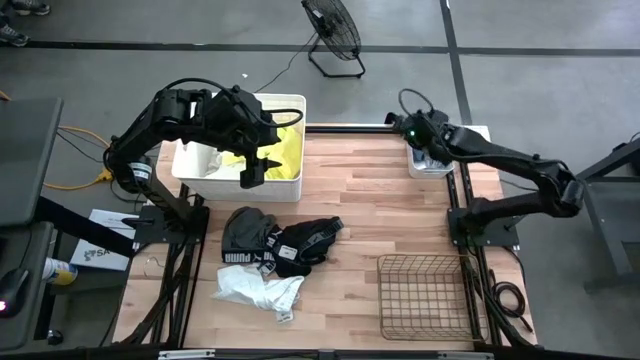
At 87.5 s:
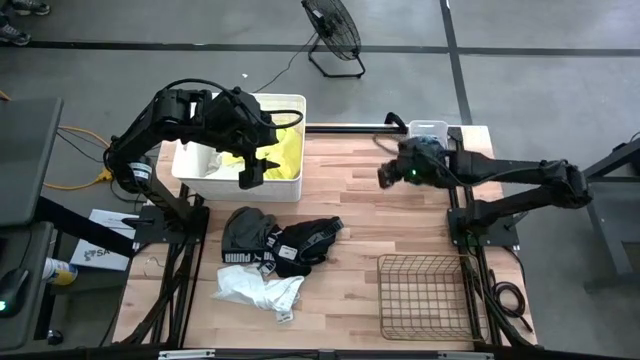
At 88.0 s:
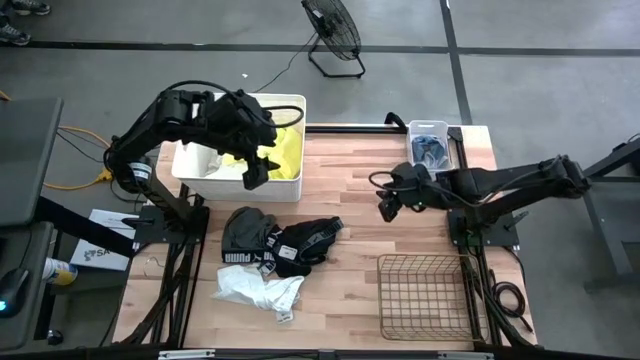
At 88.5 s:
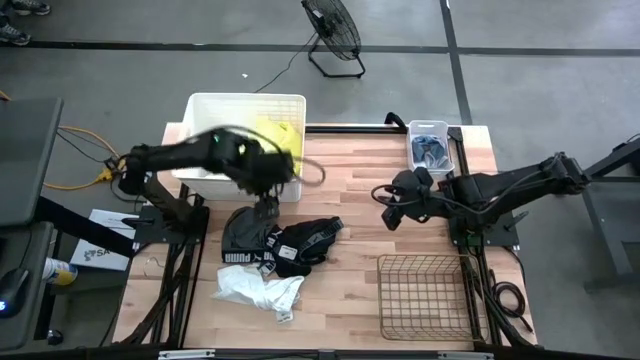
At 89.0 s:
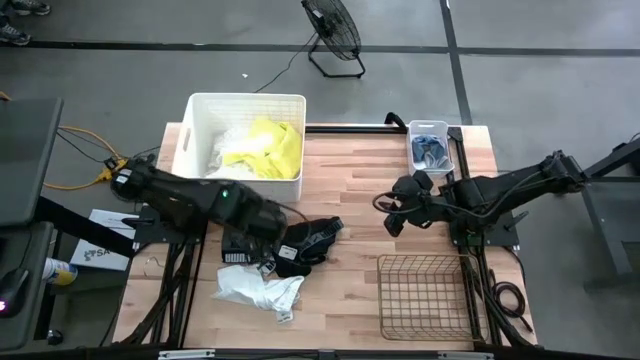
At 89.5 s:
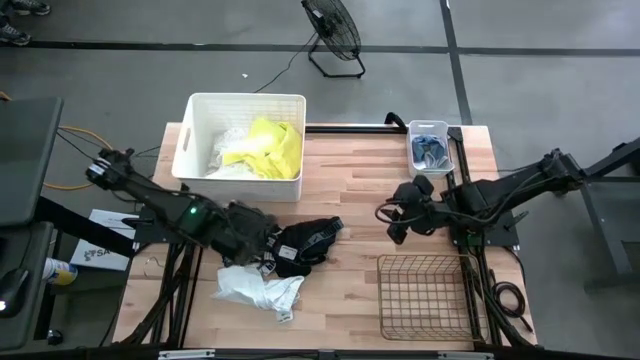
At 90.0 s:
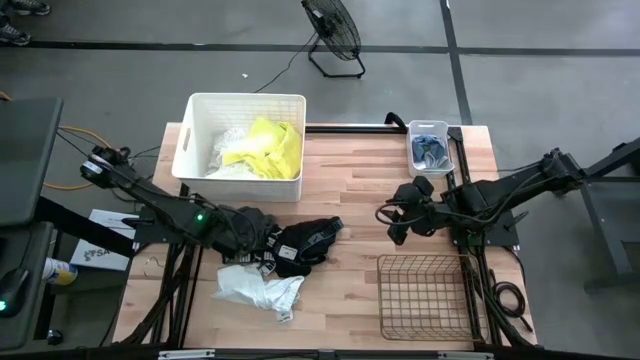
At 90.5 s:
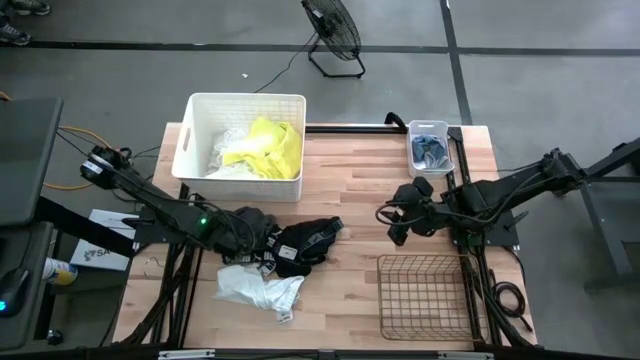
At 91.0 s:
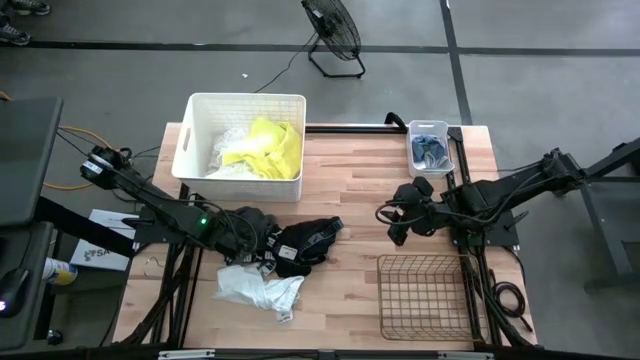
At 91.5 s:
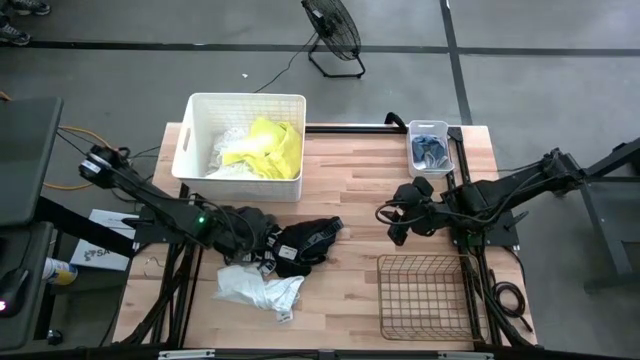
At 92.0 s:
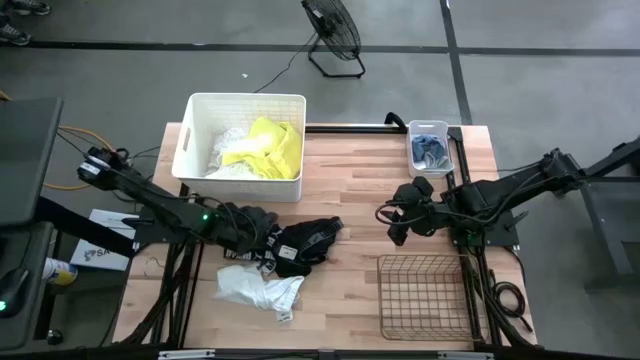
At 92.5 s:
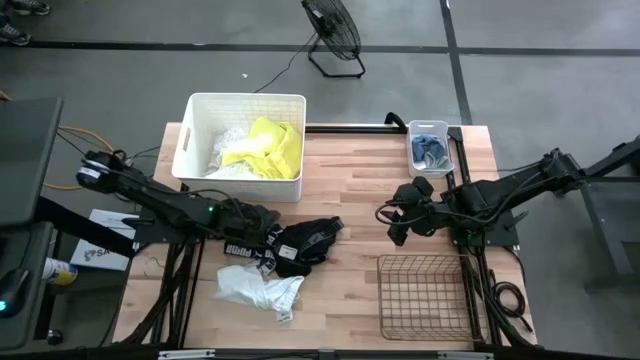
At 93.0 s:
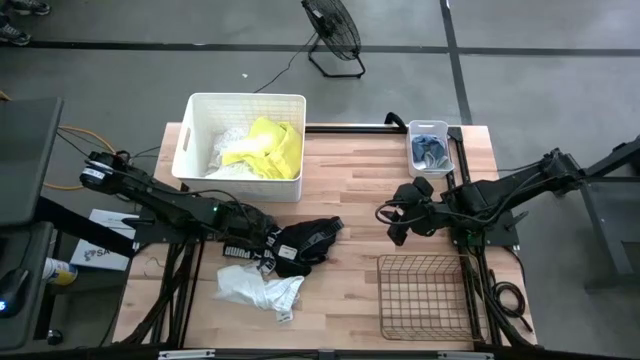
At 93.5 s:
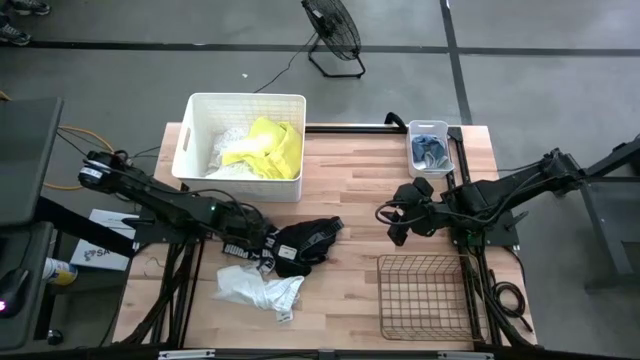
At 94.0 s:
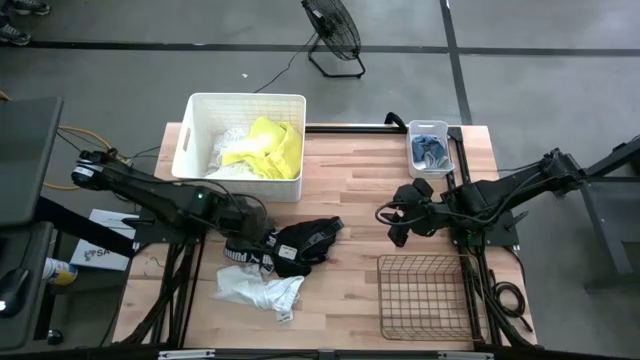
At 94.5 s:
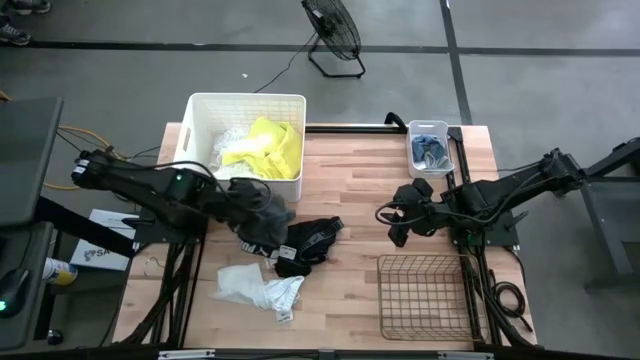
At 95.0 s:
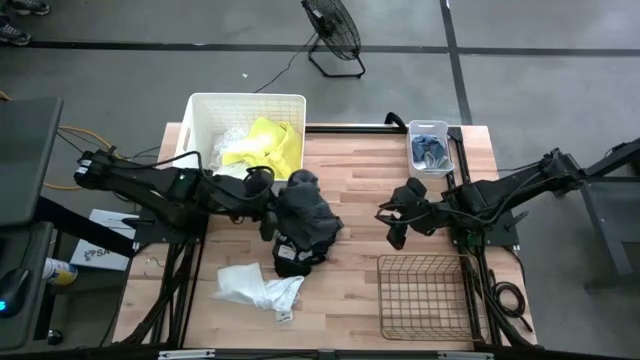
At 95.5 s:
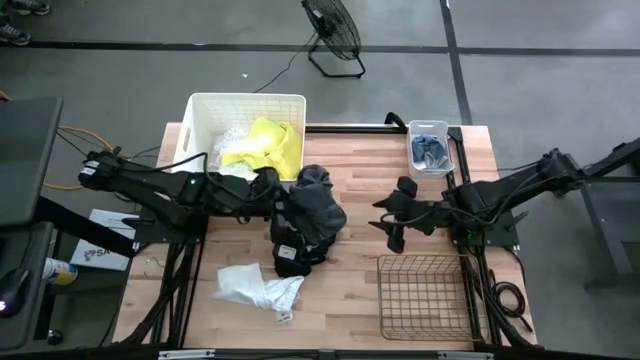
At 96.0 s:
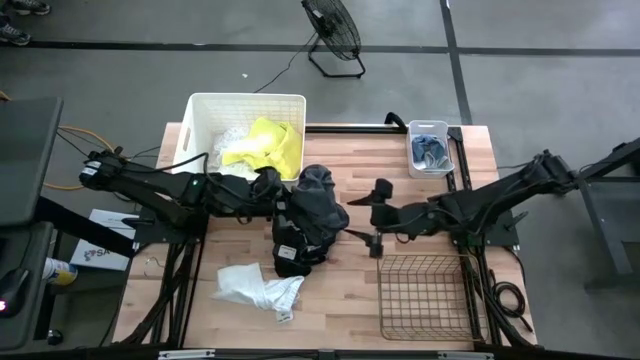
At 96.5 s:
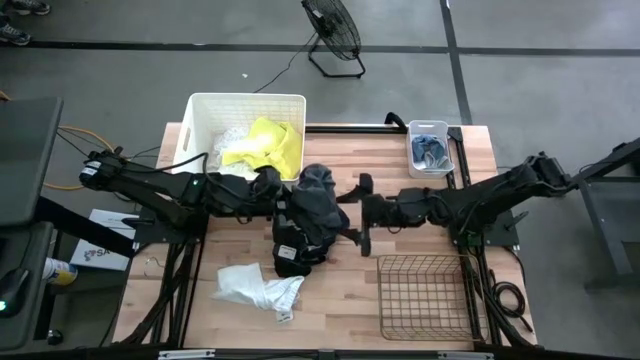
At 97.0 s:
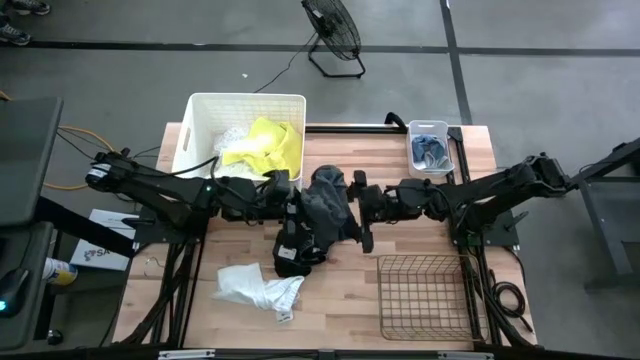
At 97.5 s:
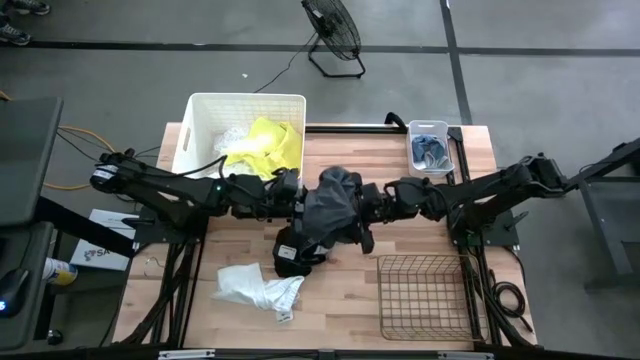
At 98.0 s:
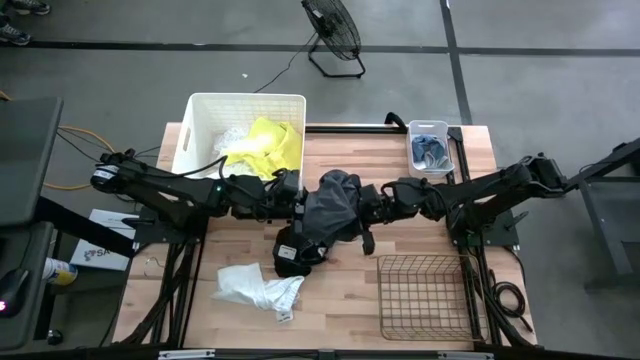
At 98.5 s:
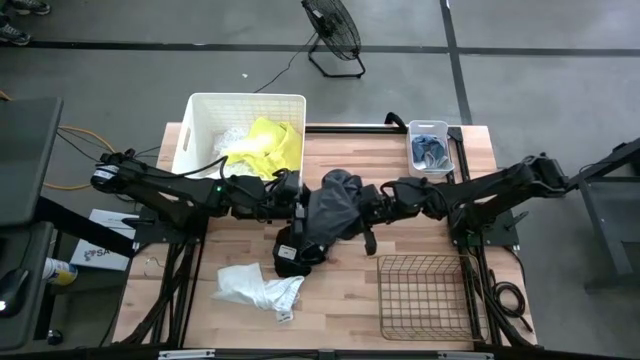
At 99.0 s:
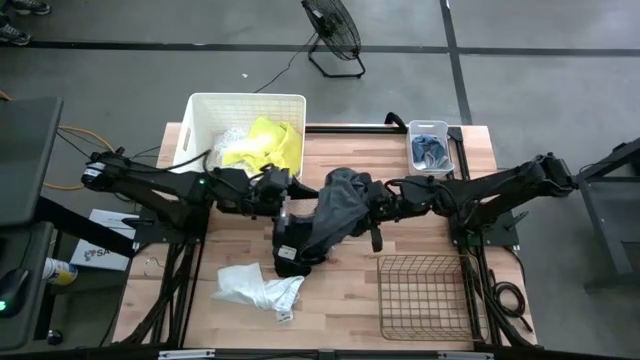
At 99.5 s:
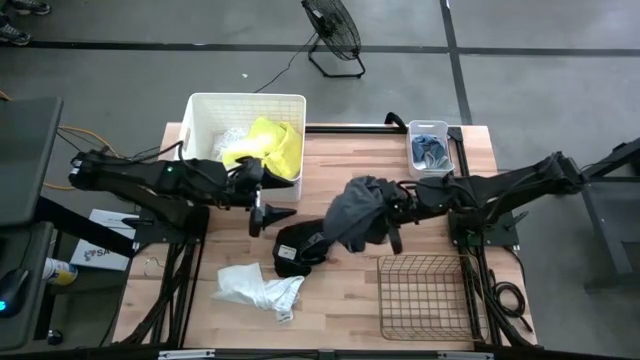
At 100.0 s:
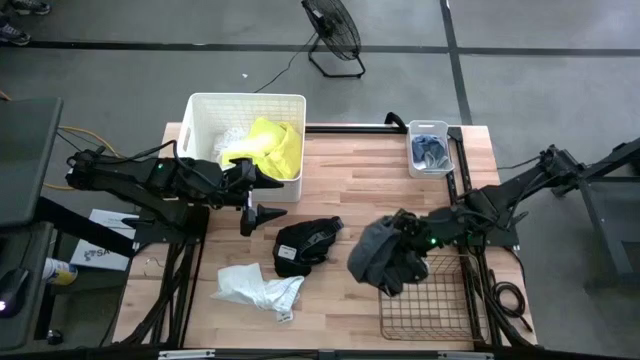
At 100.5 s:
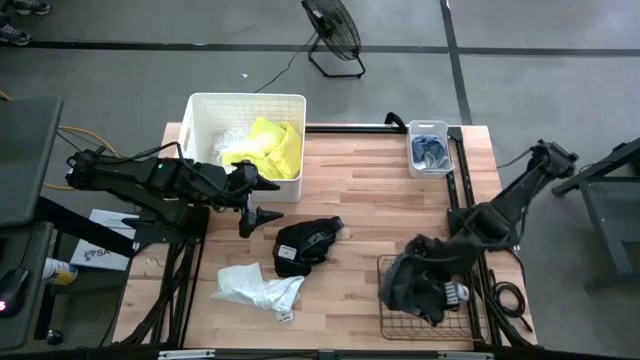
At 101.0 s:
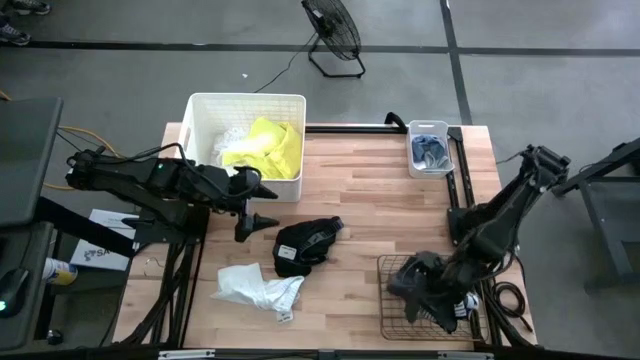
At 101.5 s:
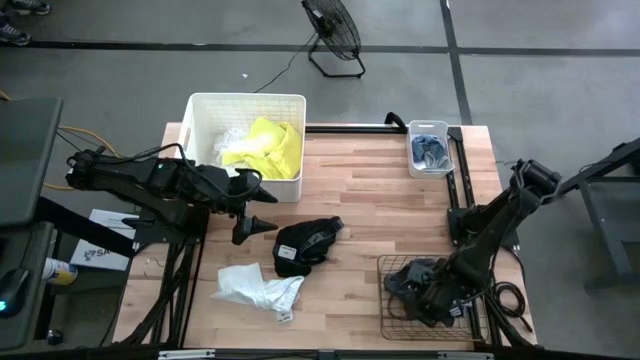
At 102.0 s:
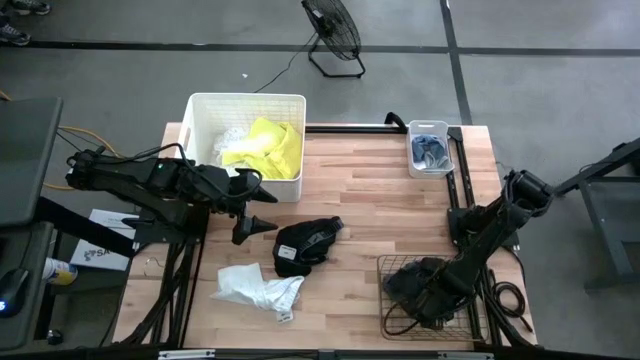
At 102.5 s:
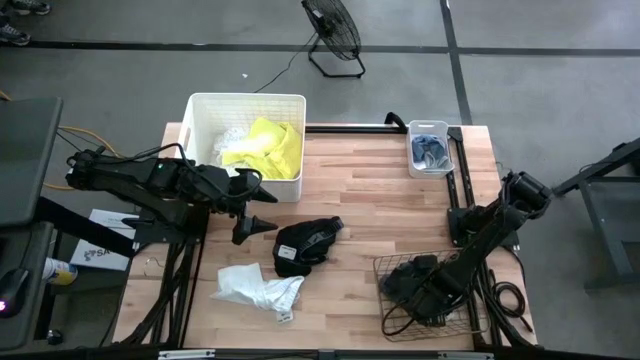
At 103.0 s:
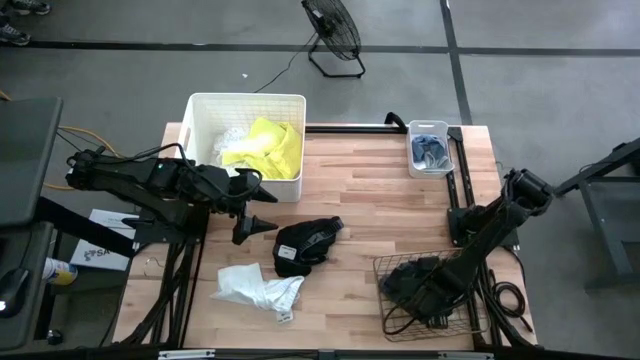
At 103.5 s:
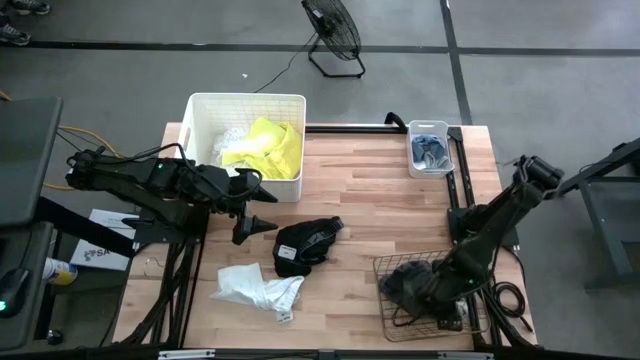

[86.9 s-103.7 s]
Task: Pick & Place Cloths
Put the gray underwear into the wire basket

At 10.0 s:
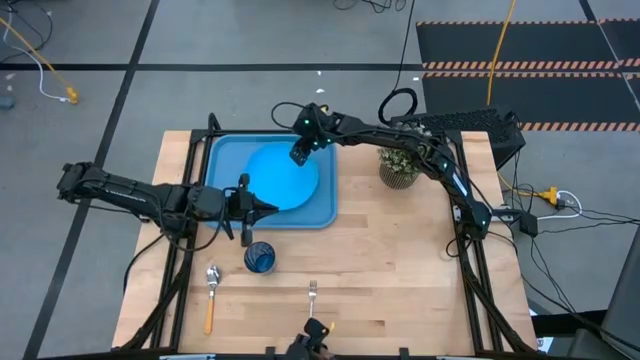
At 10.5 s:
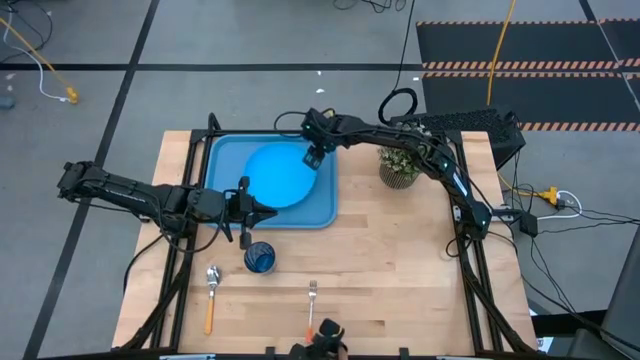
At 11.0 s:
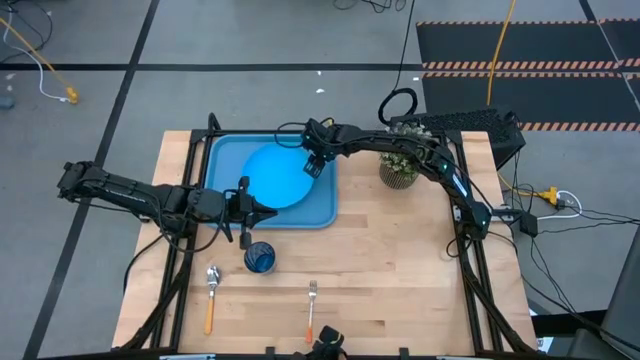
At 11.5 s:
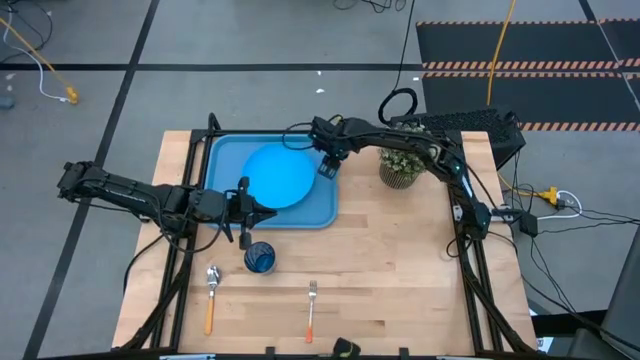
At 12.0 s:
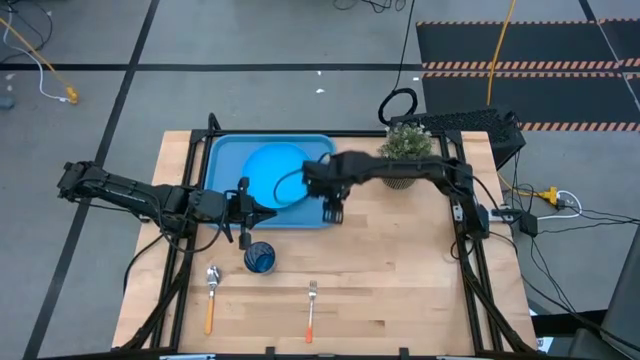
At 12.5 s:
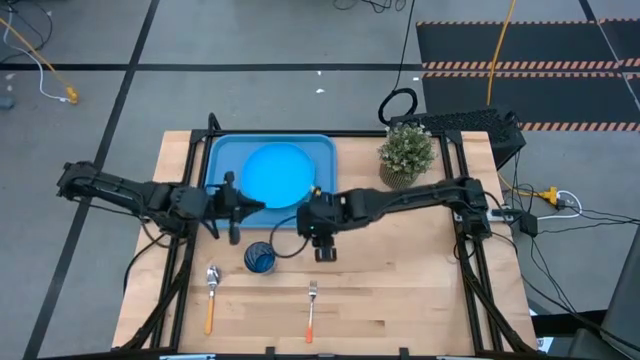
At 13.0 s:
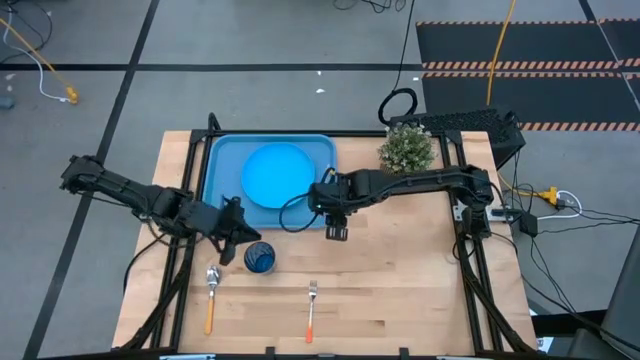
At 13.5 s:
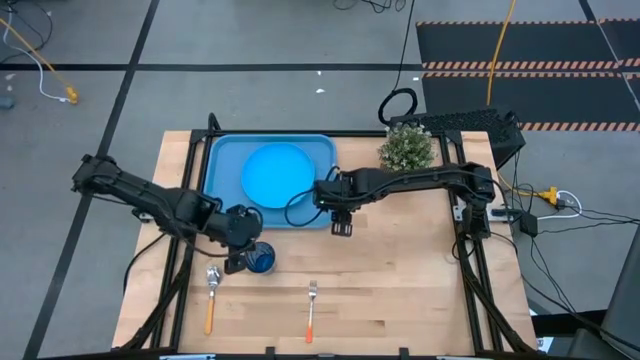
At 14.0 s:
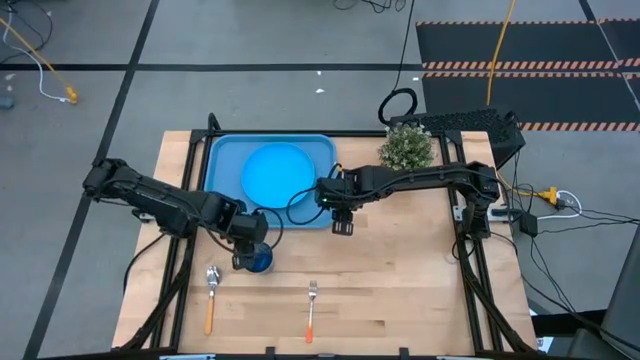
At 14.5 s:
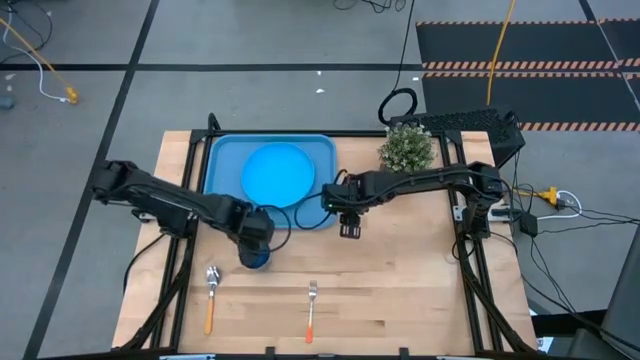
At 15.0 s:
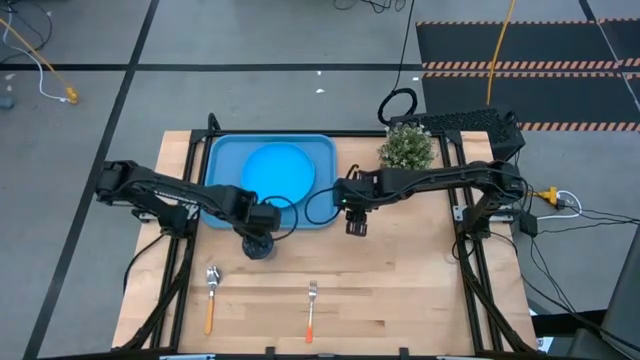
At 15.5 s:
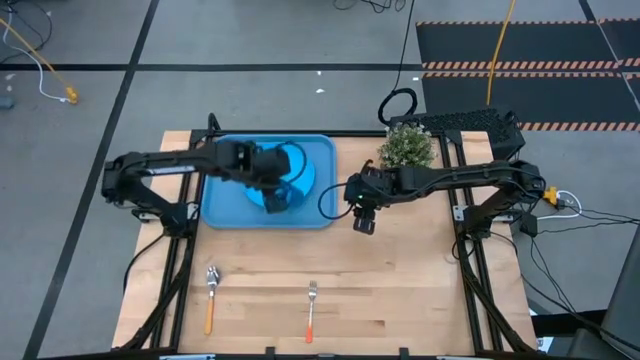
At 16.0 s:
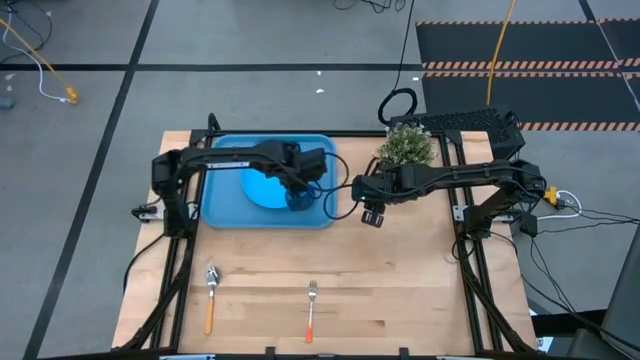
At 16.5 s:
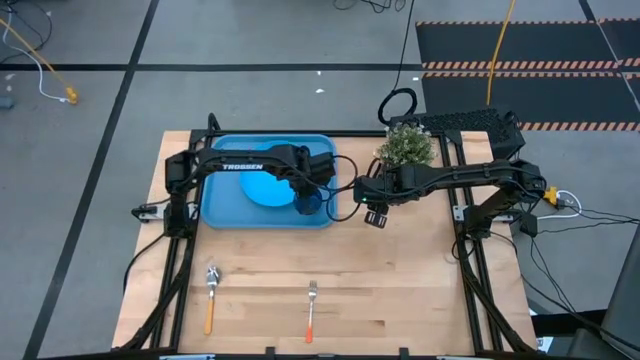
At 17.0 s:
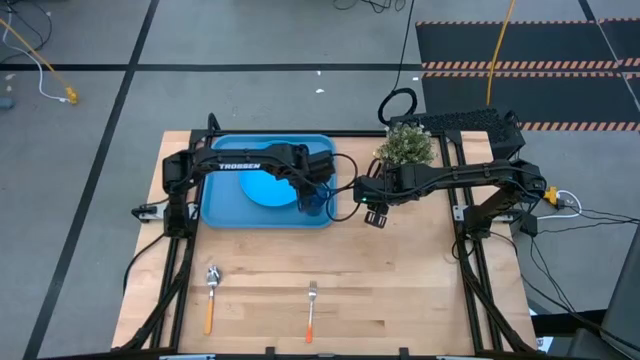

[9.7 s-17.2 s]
Task: Pick and place plate/cup/fork/spoon on tray
Put the blue cup on the blue tray to the bottom right of the blue plate
